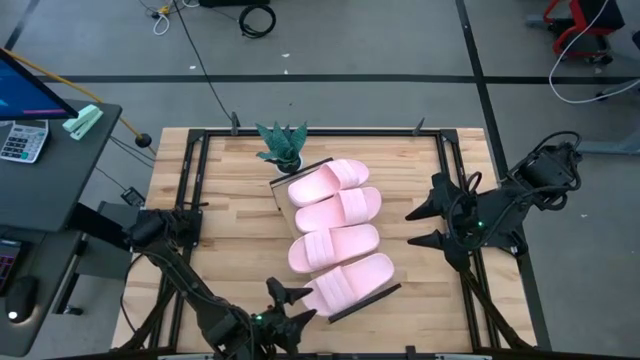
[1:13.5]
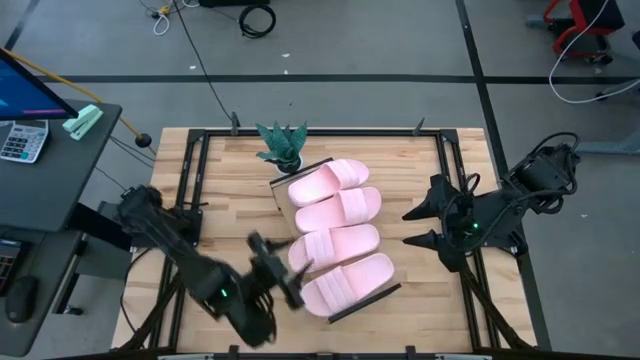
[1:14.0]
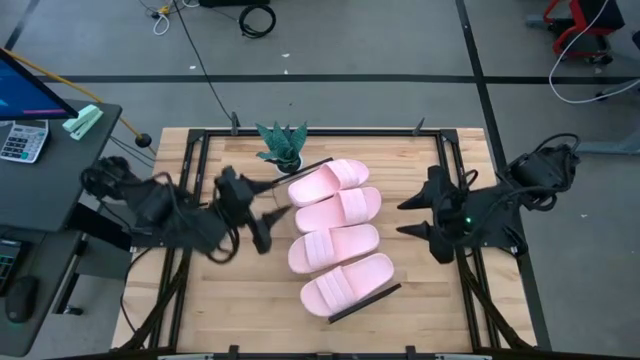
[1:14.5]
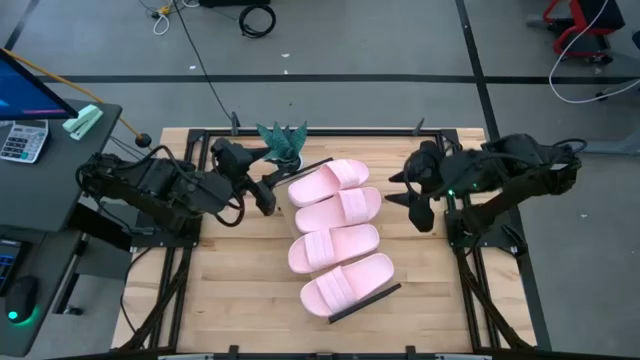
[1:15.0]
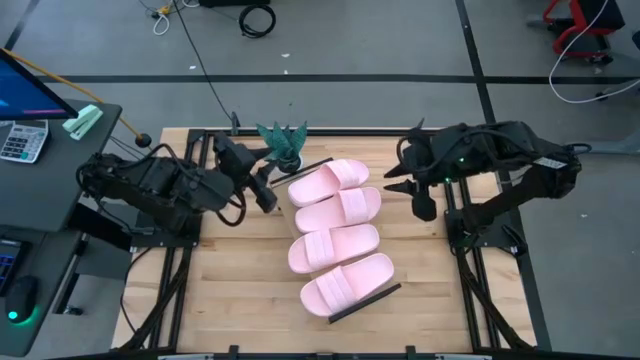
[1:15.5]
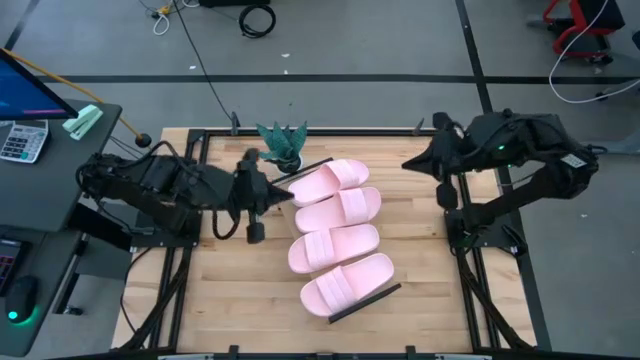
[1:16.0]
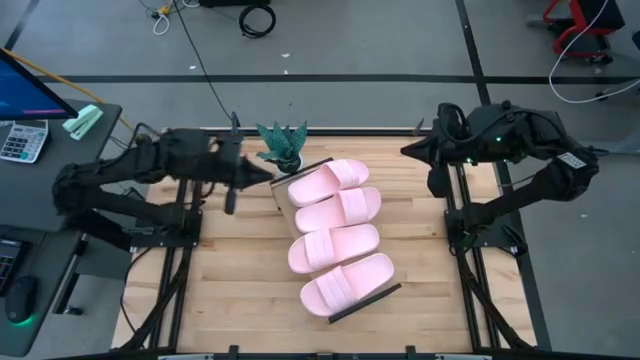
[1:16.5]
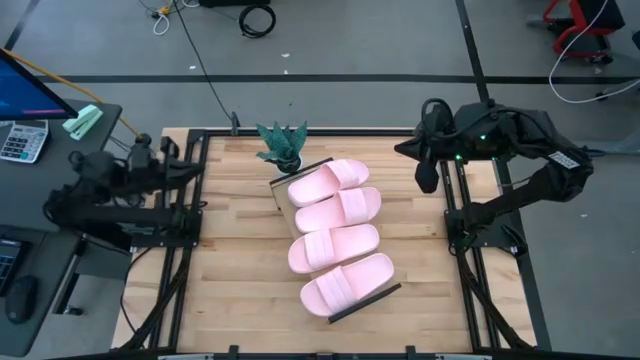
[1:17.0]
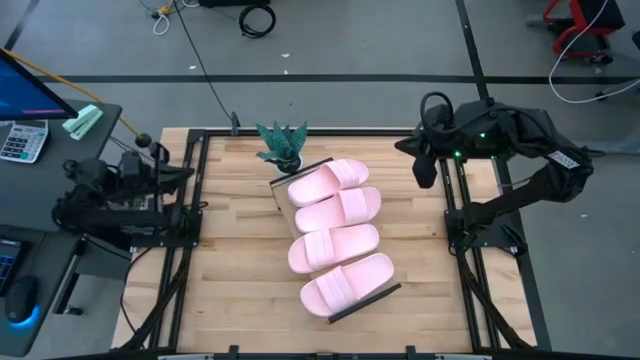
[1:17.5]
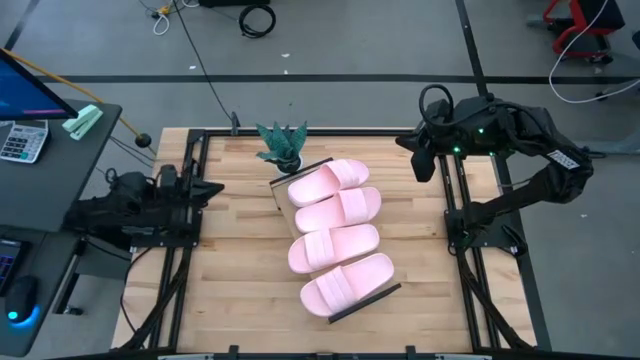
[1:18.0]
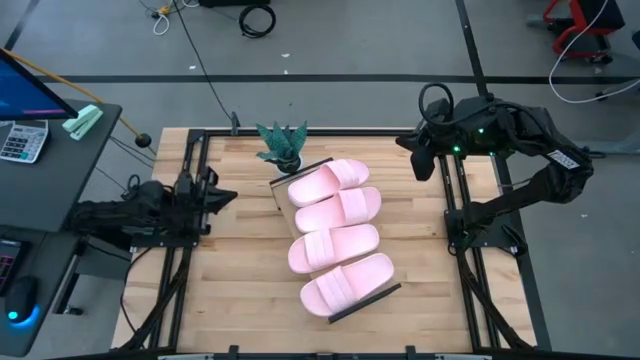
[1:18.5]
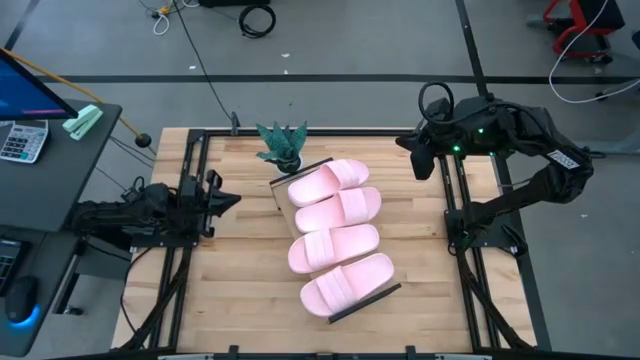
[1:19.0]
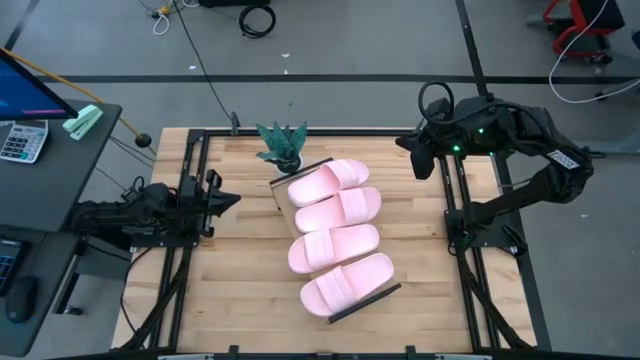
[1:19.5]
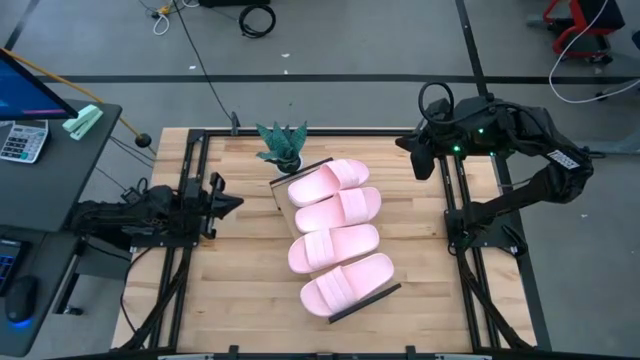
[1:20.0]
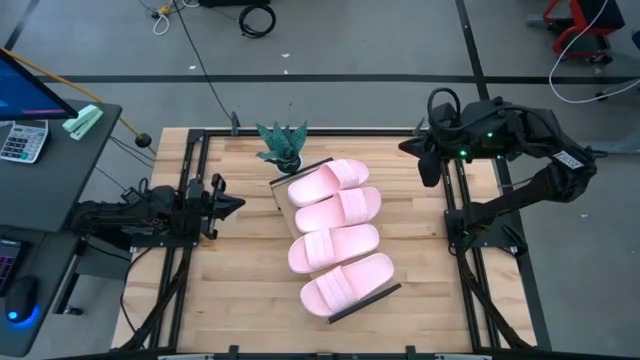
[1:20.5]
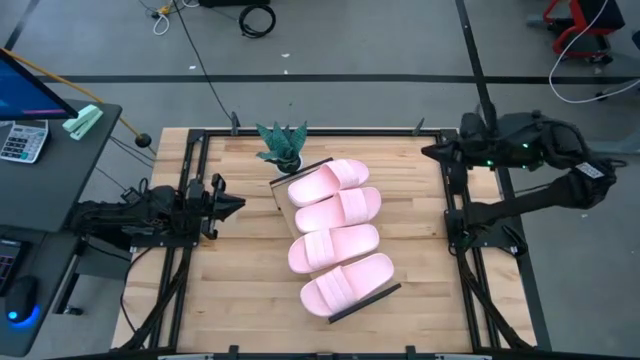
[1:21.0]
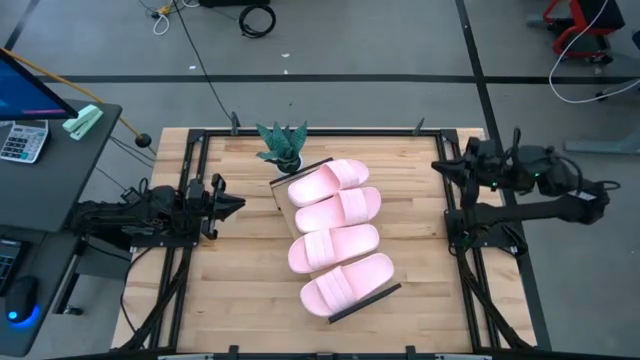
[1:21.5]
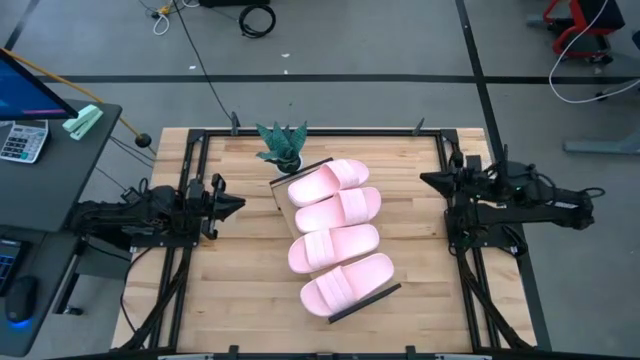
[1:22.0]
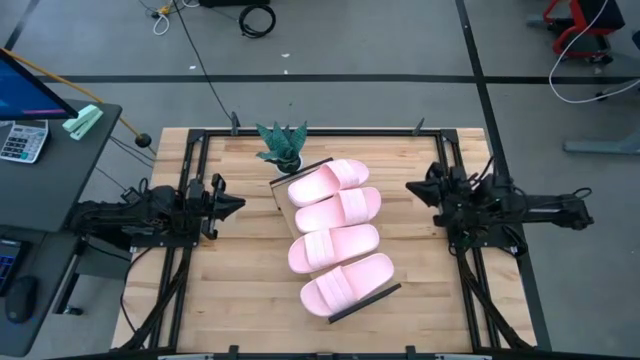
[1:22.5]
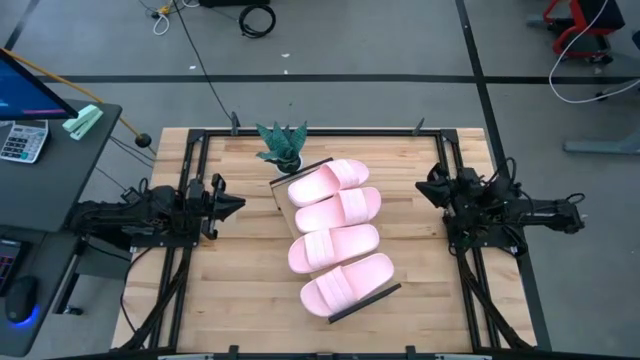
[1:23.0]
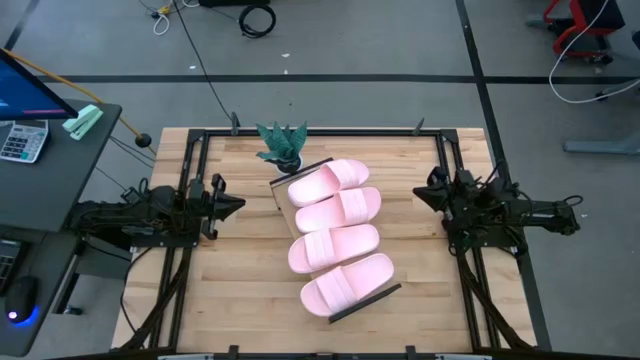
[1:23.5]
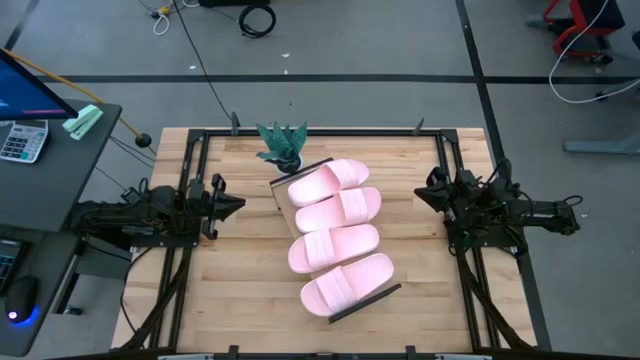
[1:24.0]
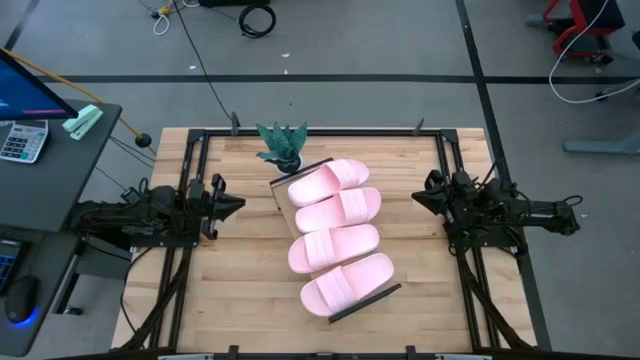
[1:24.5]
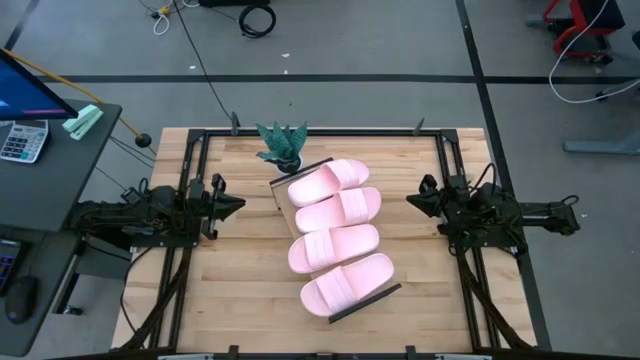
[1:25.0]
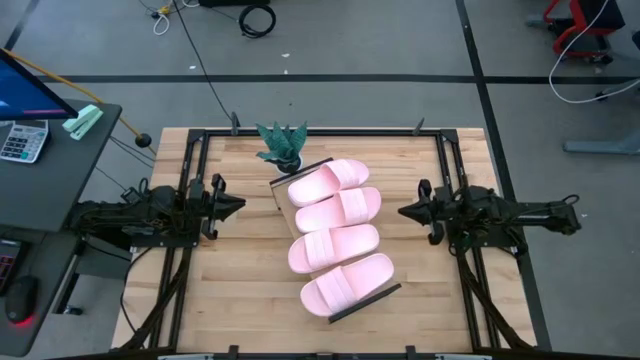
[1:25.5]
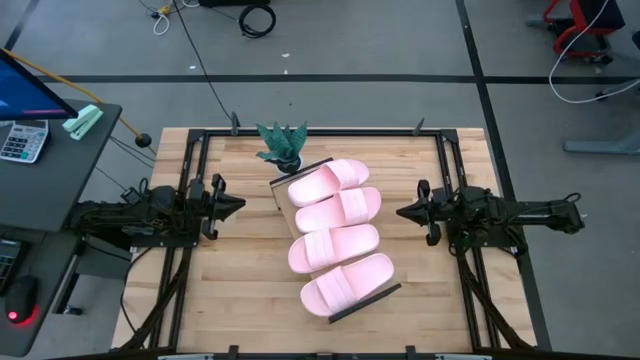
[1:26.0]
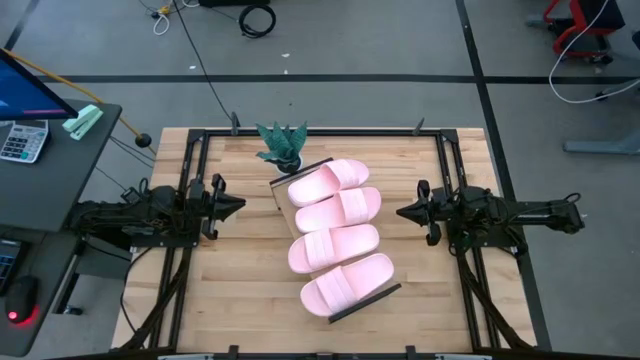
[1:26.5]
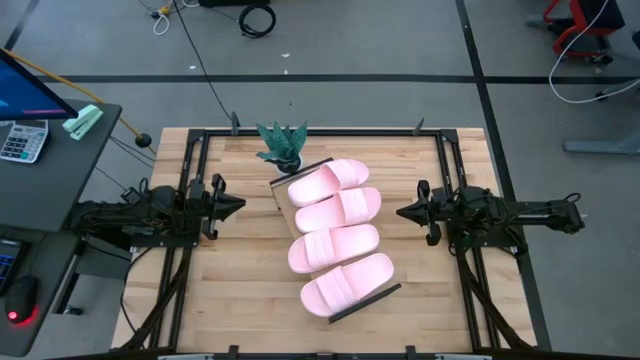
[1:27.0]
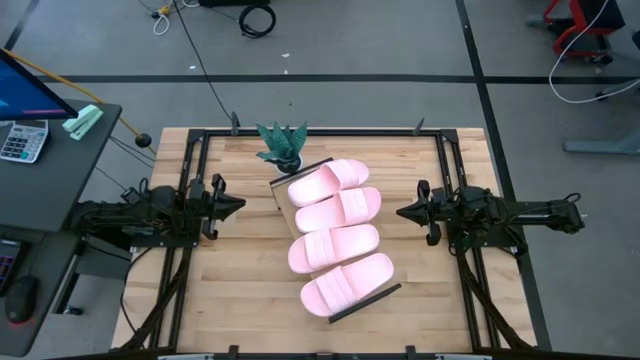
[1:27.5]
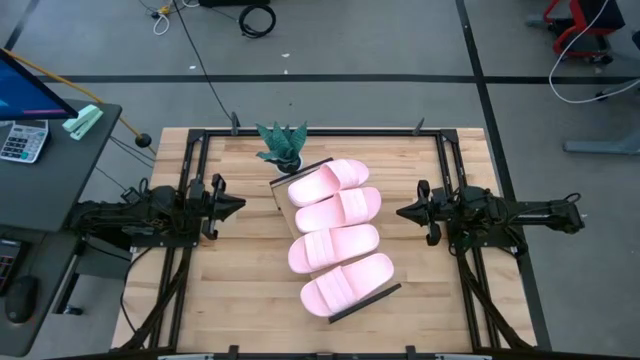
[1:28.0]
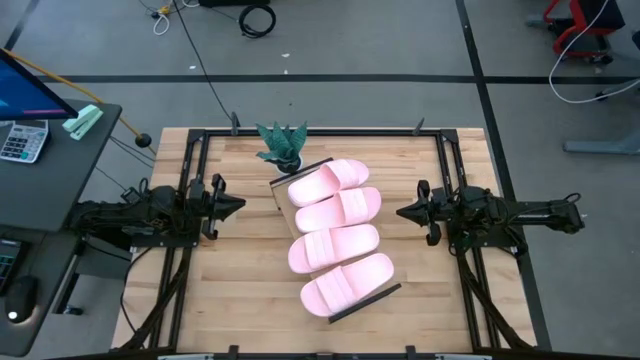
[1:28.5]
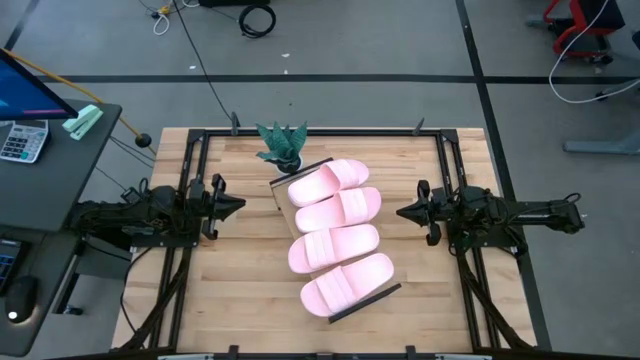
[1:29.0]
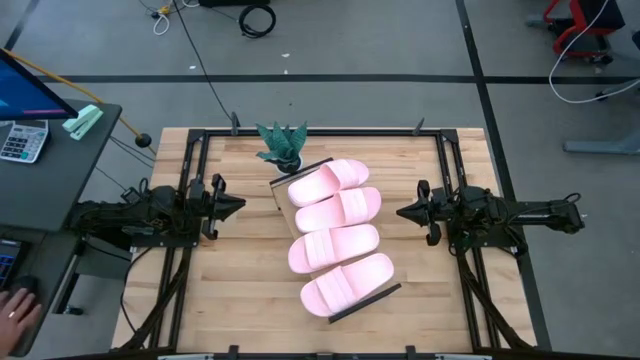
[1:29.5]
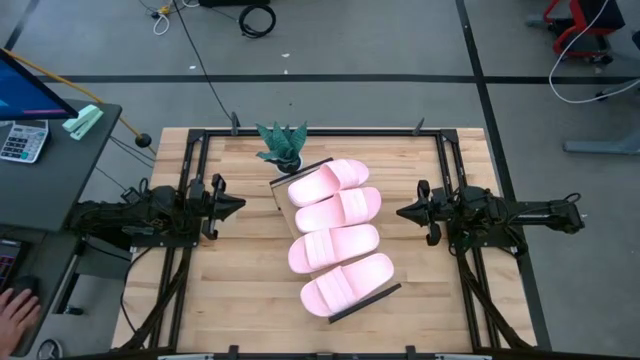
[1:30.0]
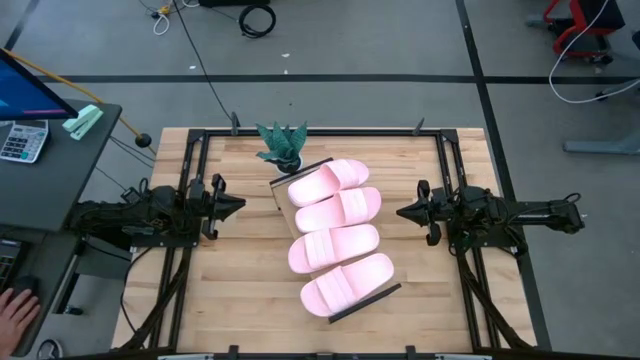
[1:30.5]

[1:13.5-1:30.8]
Task: Pick and place slides into the shelf
Return to Home Position

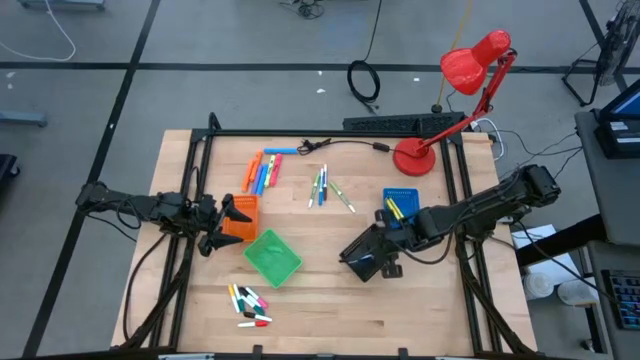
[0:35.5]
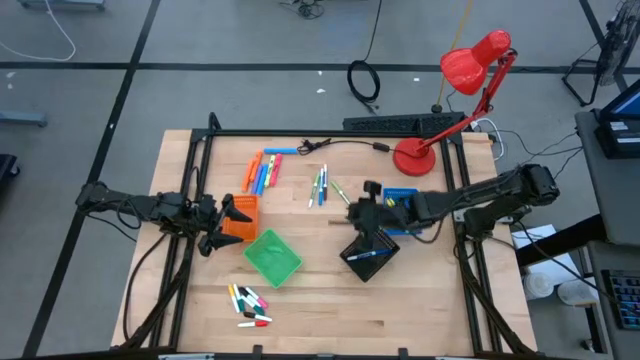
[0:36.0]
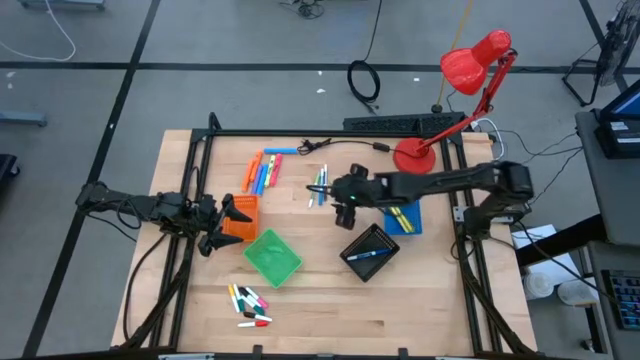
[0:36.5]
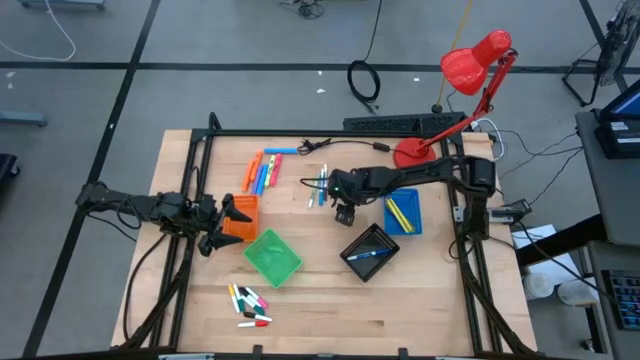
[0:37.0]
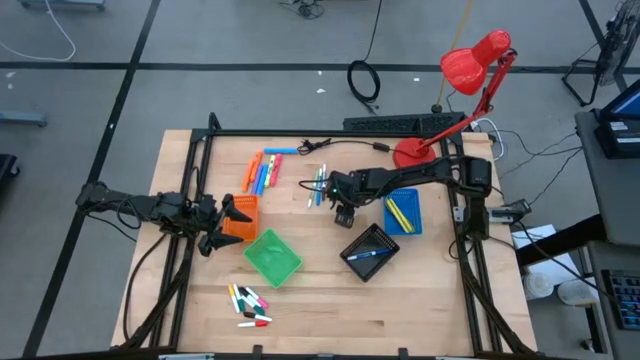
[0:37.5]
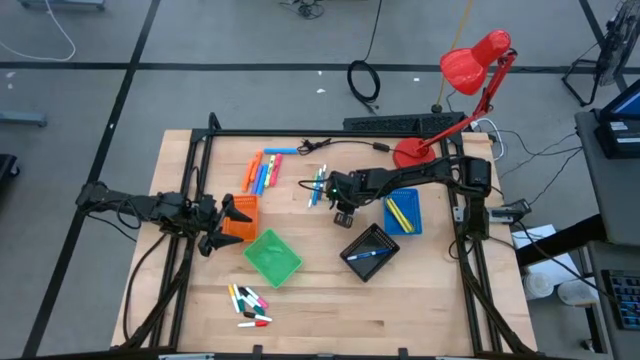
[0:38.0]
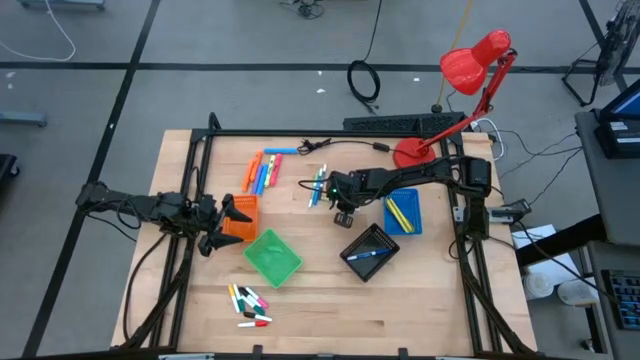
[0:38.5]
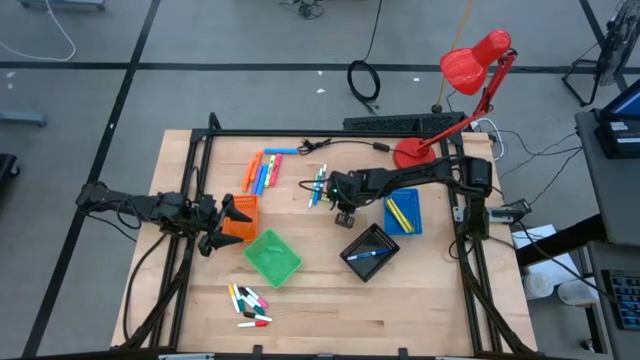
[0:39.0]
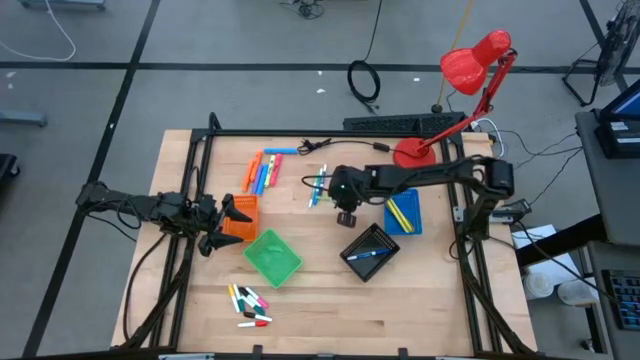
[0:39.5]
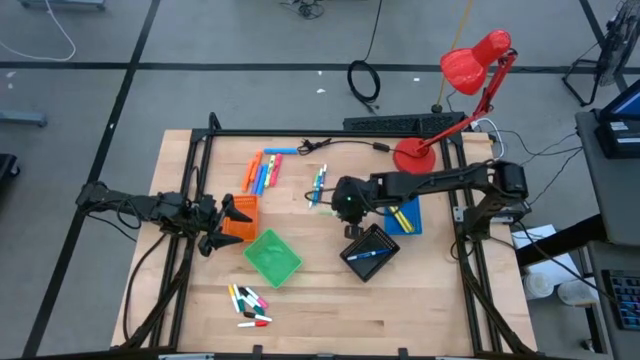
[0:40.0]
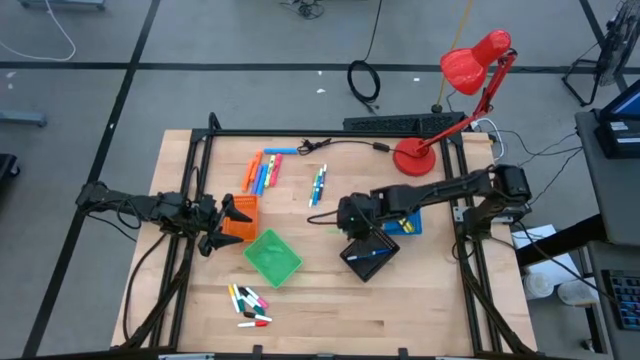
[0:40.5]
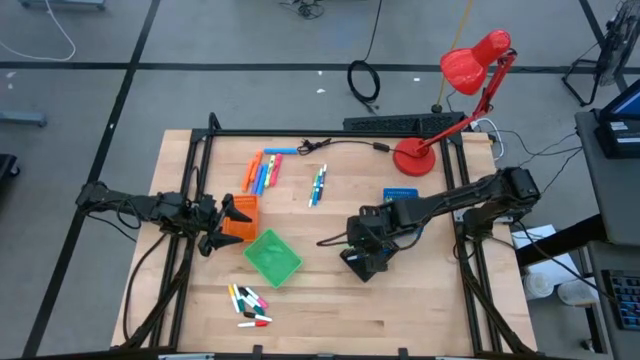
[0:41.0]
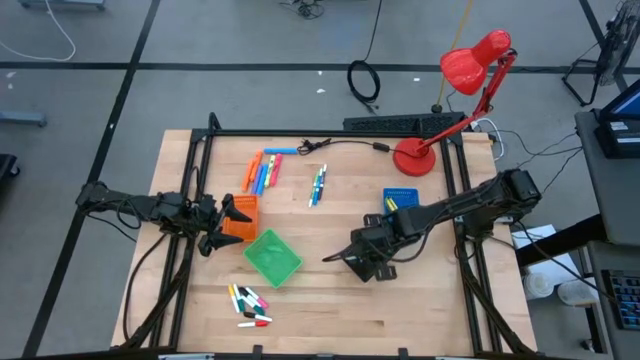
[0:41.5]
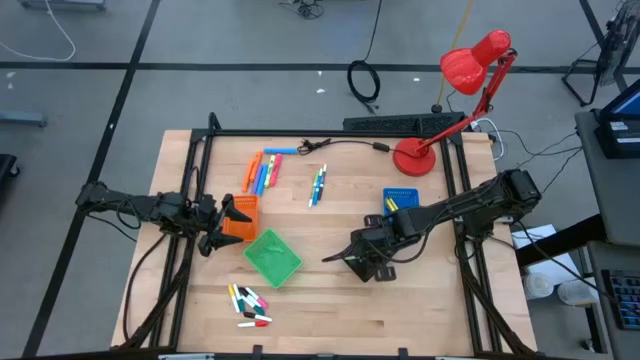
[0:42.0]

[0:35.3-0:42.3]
Task: Pick & Place Markers
Put the right green marker pen into the black basket
